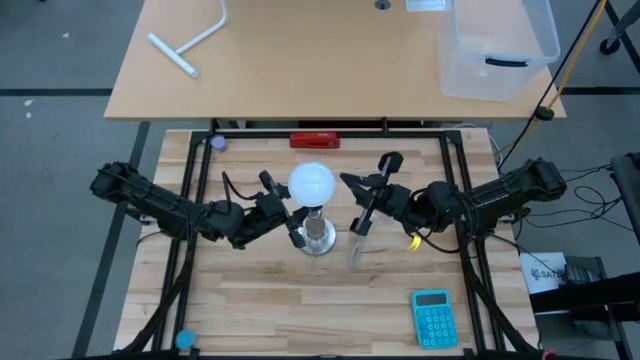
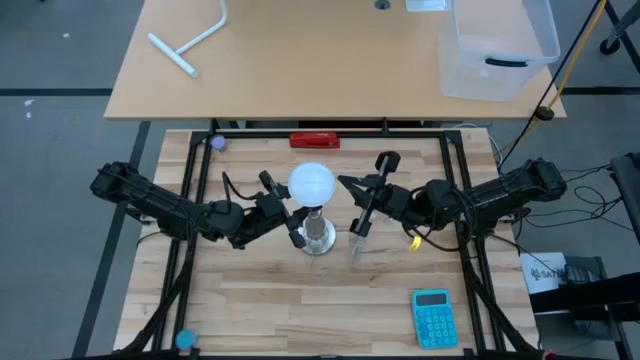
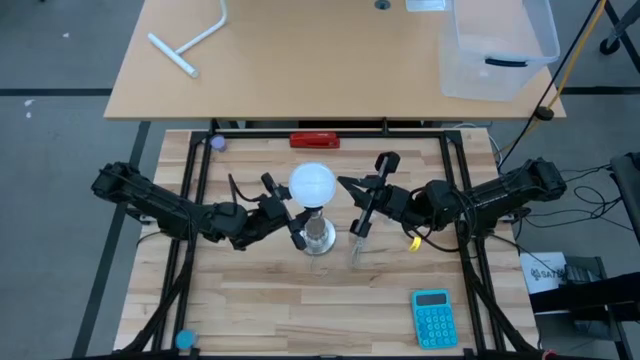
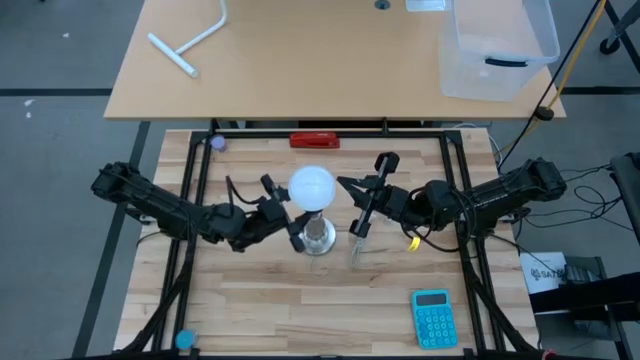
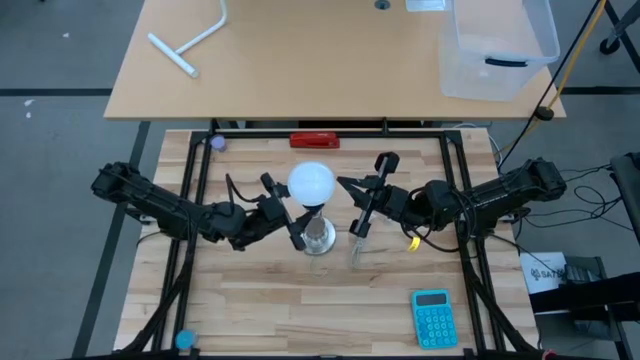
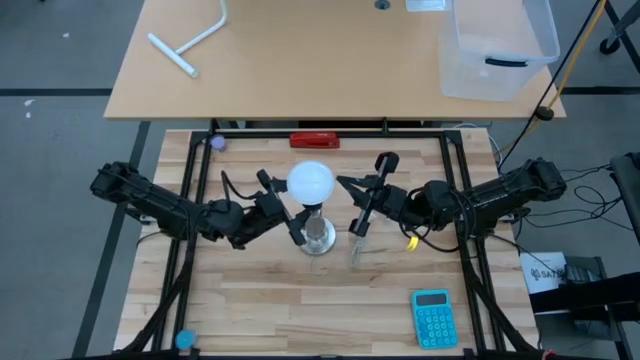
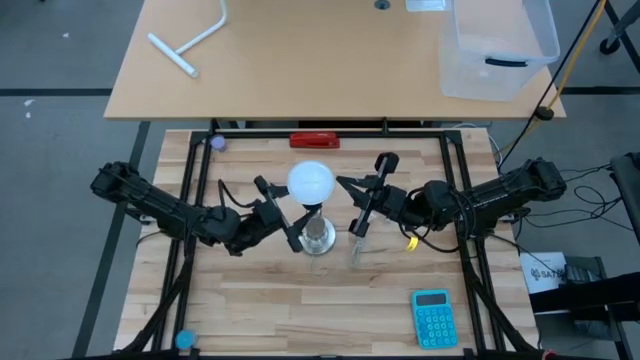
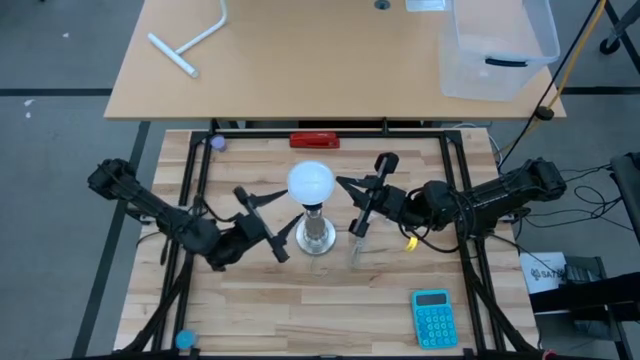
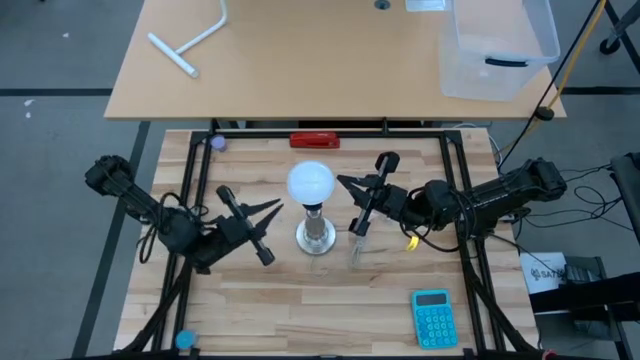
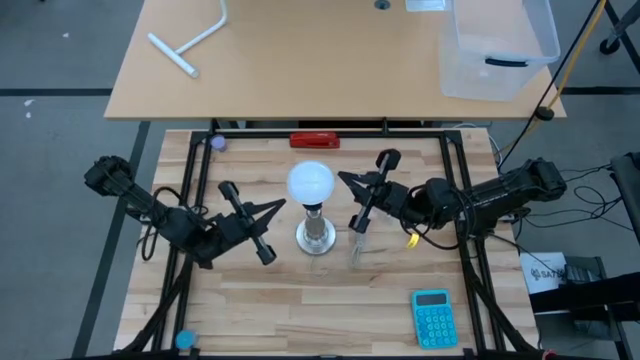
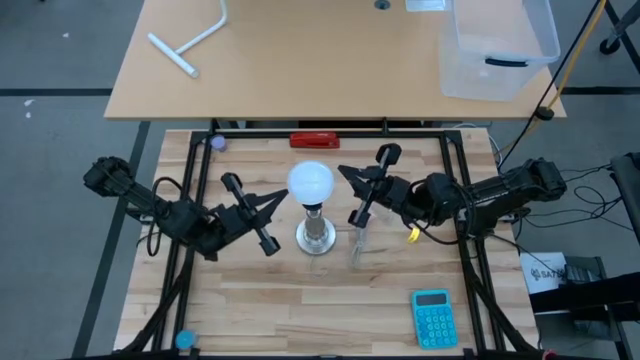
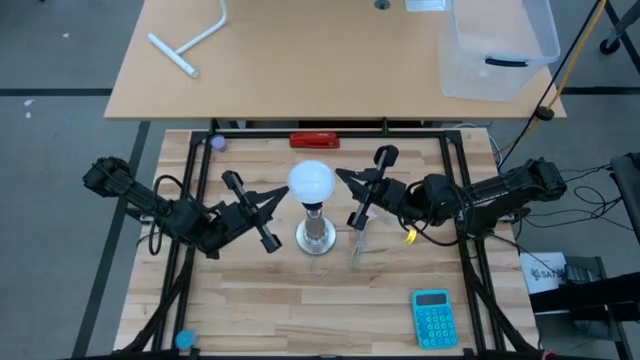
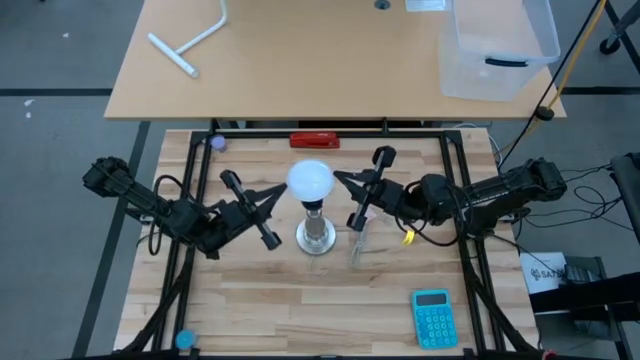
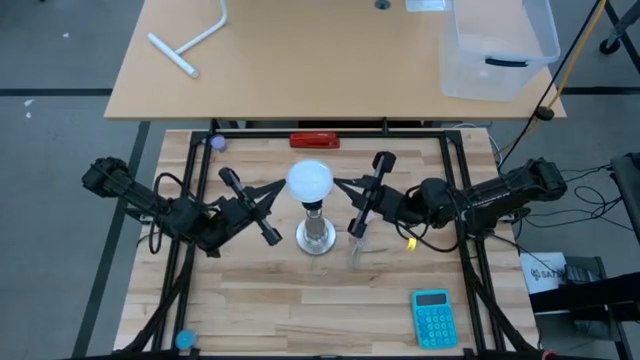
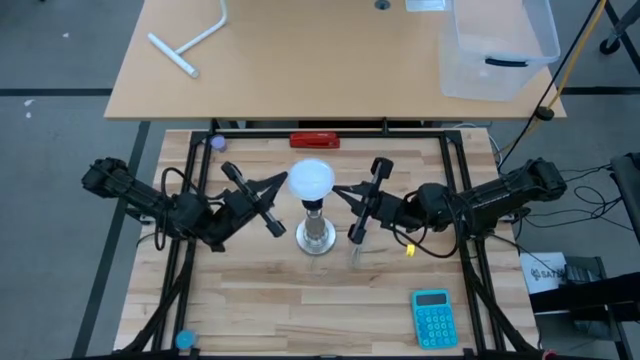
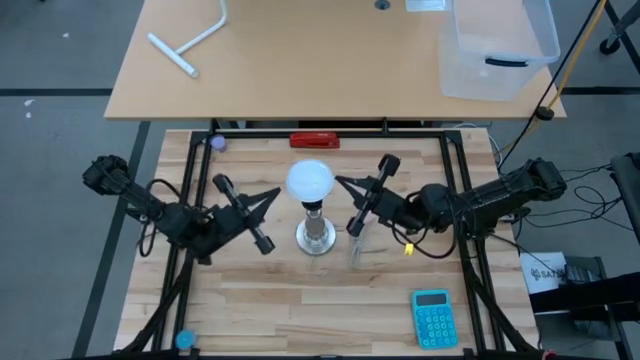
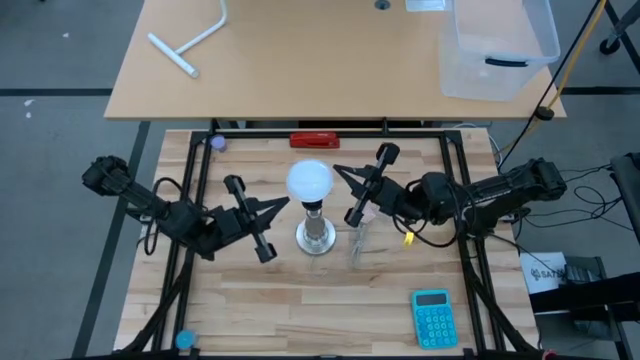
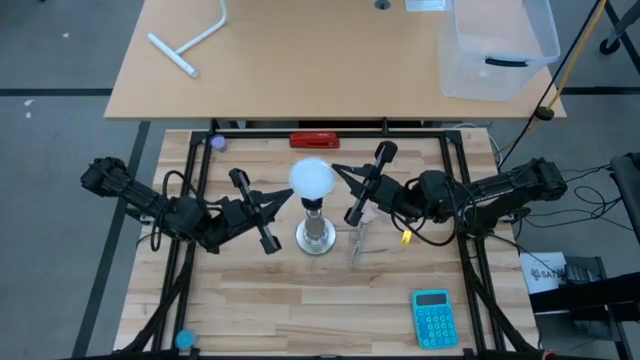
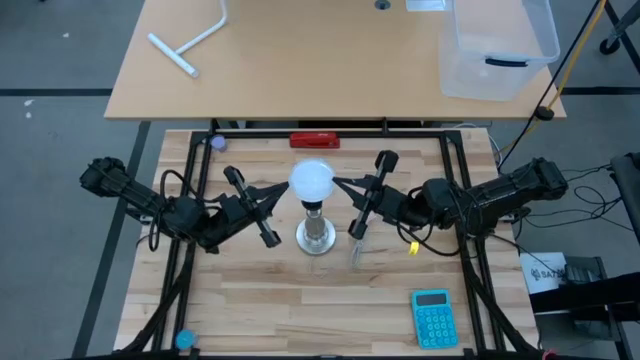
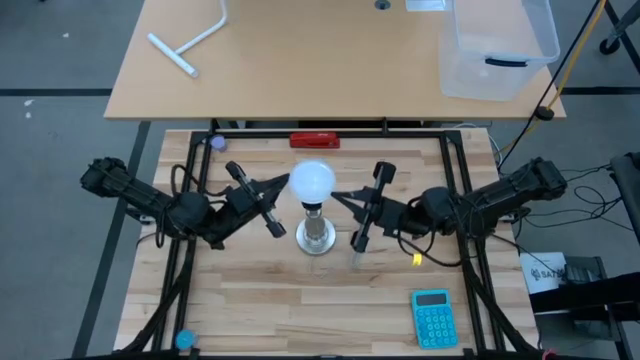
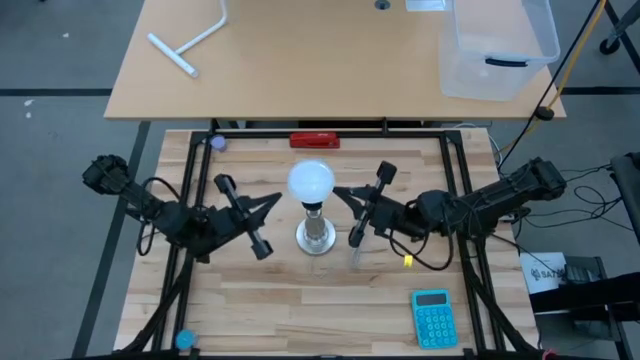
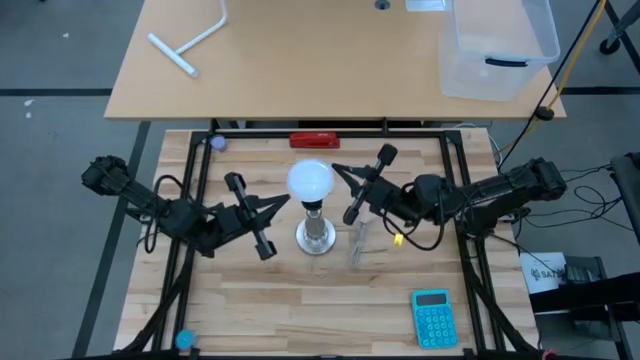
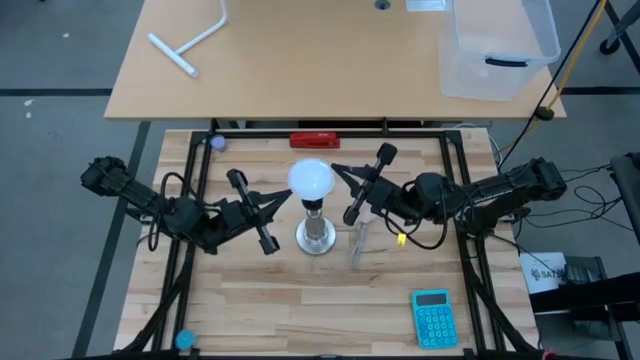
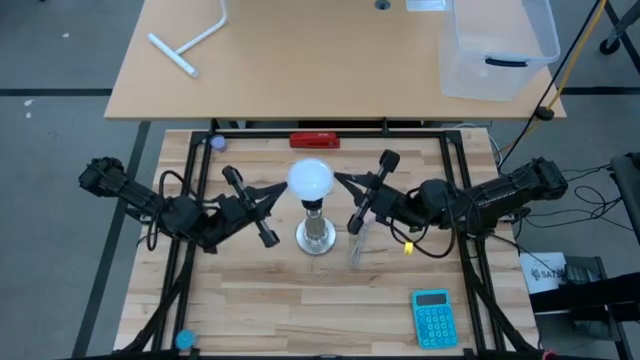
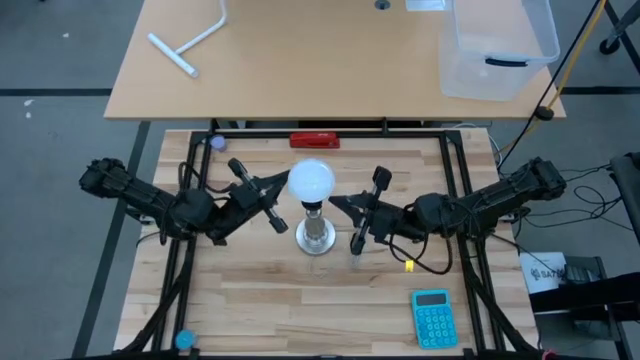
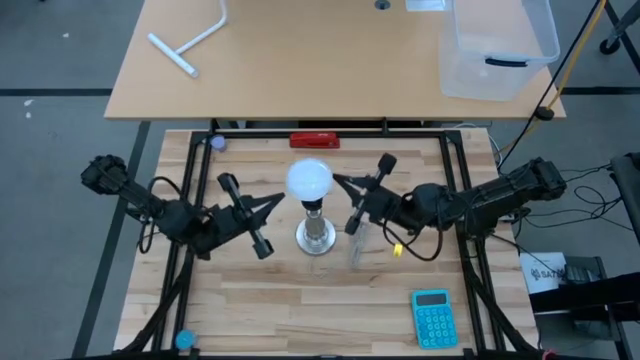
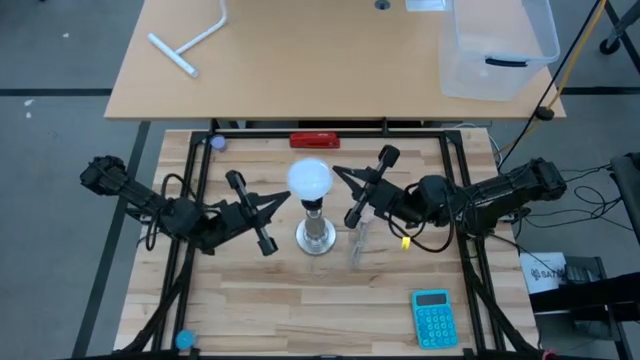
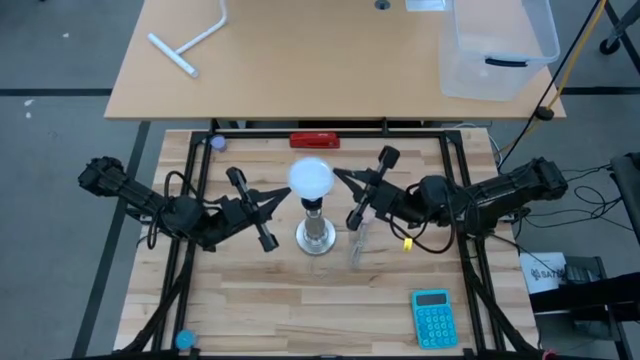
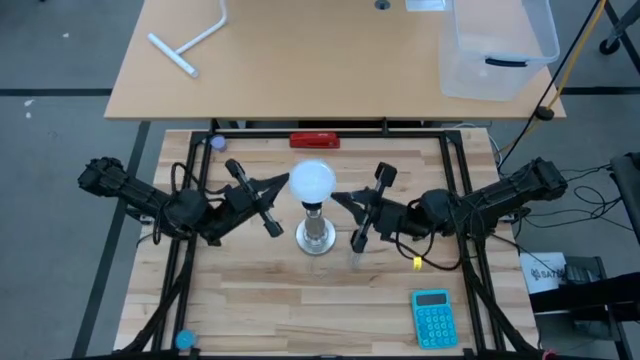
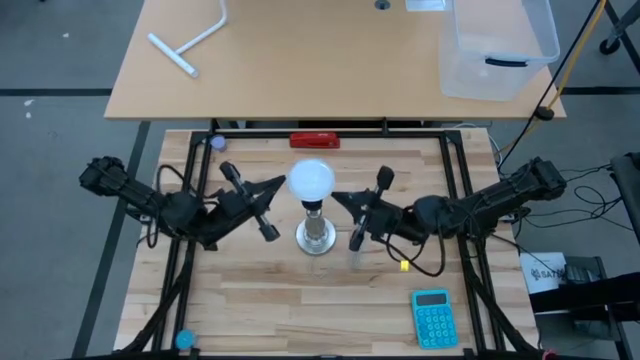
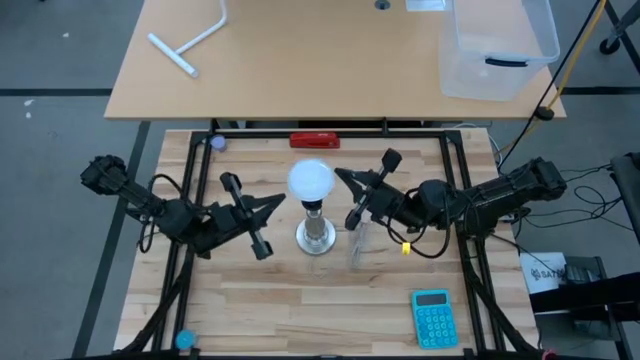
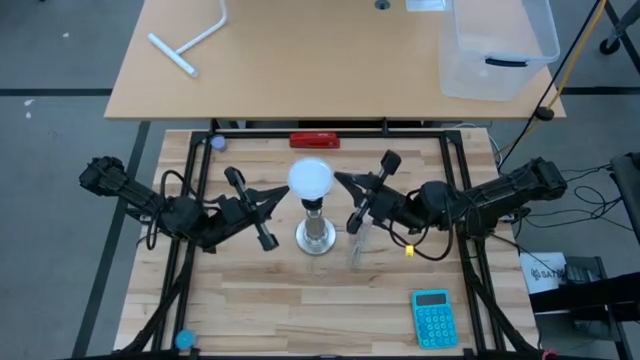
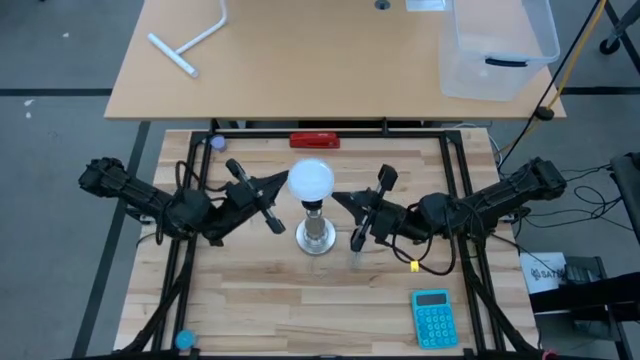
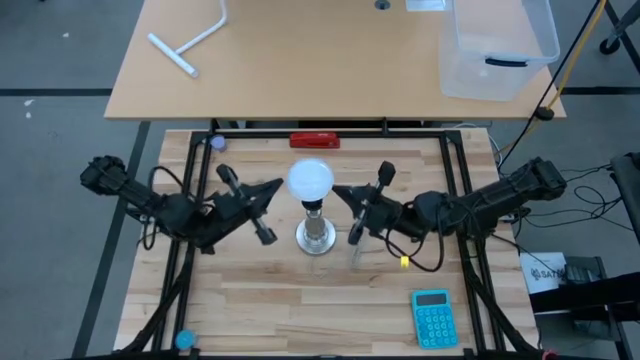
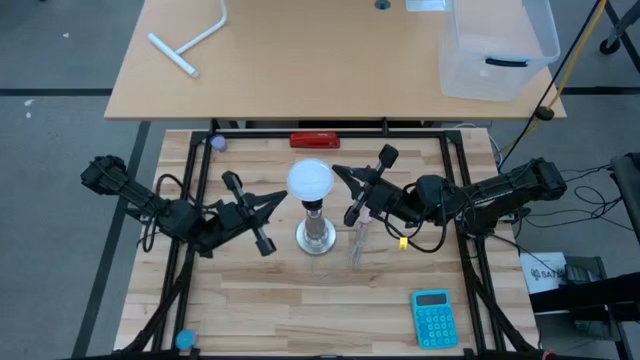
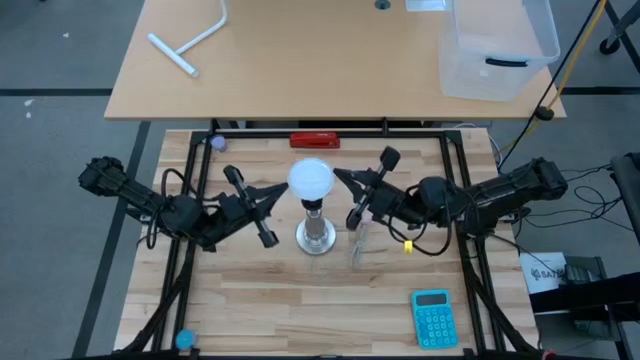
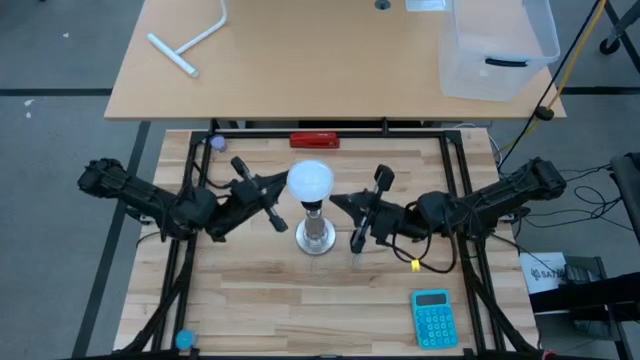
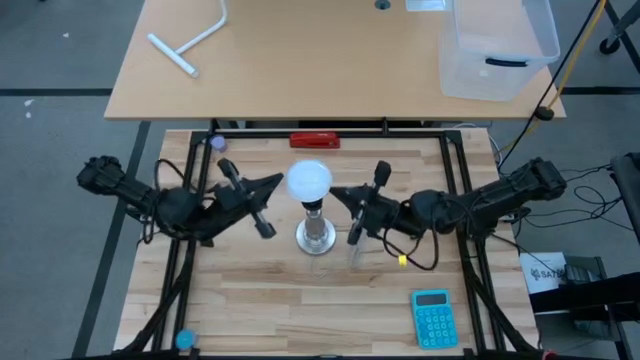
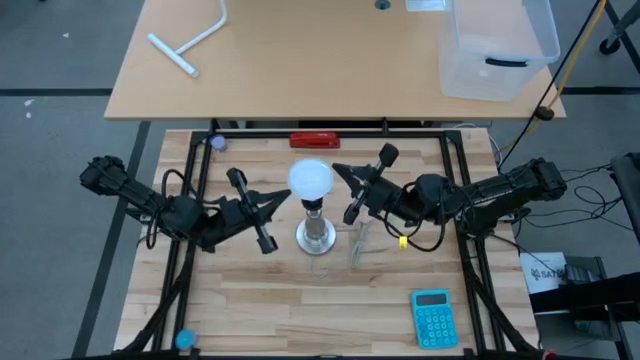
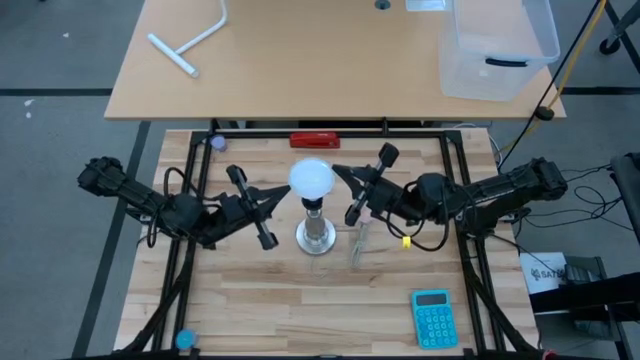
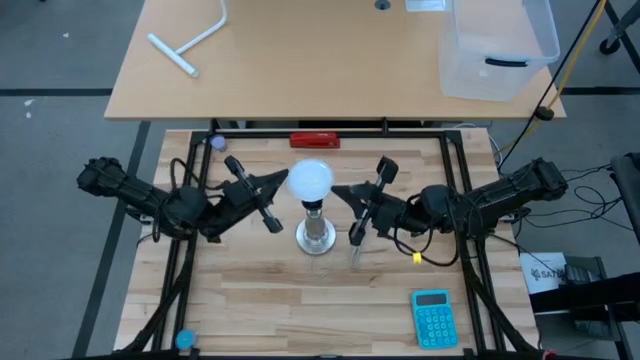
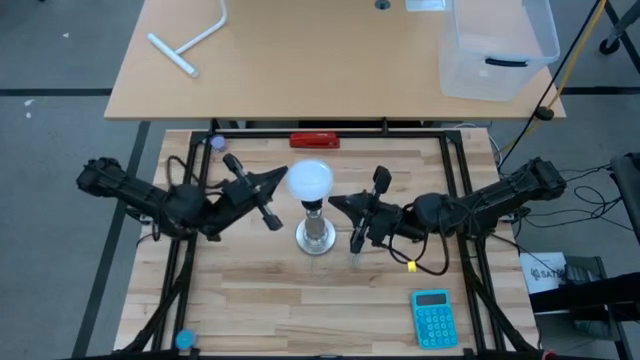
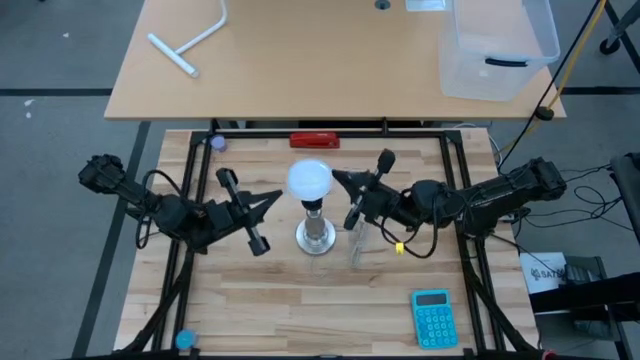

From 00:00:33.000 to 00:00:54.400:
Task: Screw lightbulb
Insert the white lightbulb into the silver lamp
